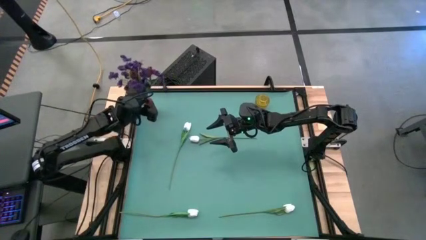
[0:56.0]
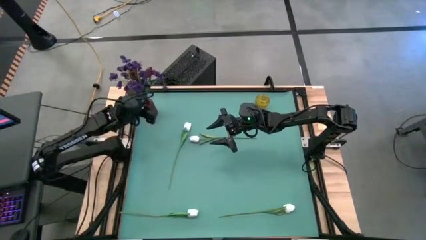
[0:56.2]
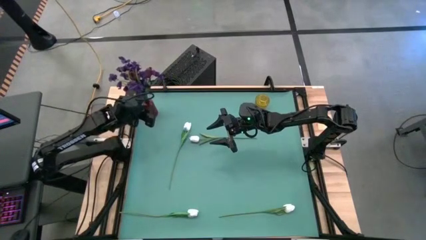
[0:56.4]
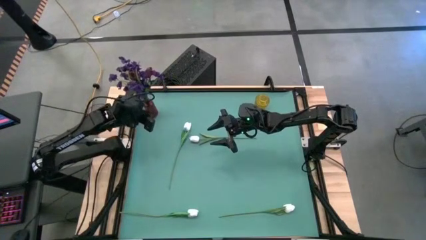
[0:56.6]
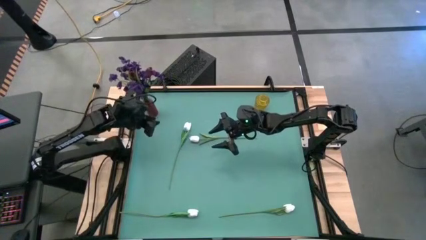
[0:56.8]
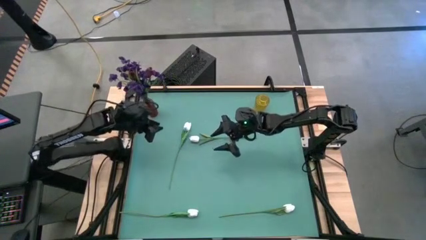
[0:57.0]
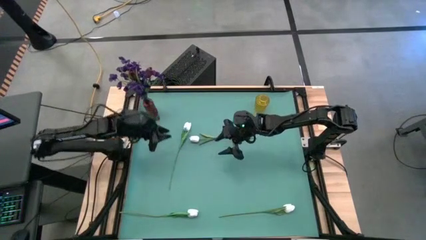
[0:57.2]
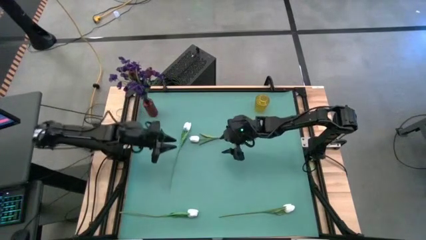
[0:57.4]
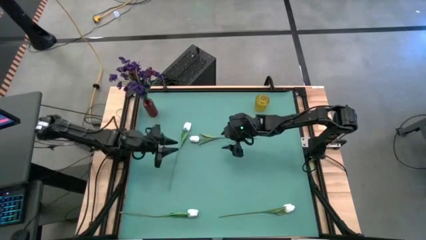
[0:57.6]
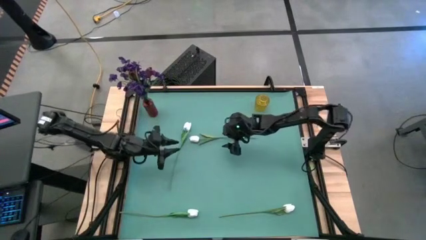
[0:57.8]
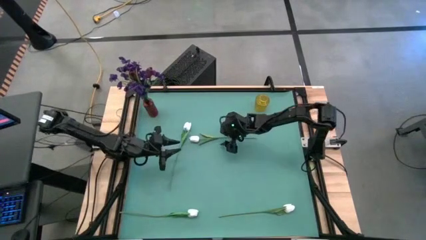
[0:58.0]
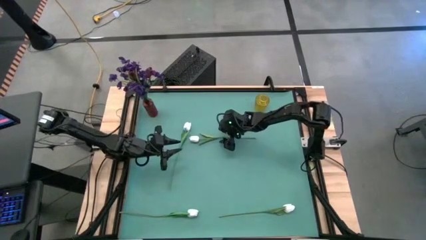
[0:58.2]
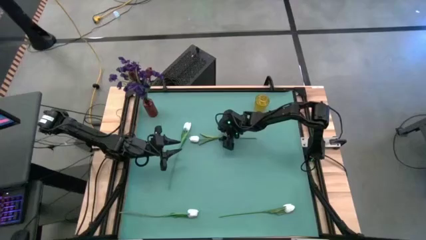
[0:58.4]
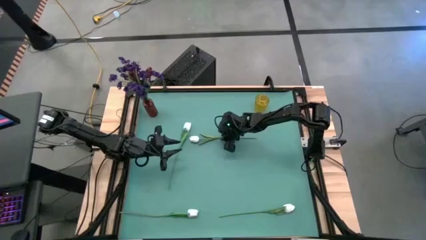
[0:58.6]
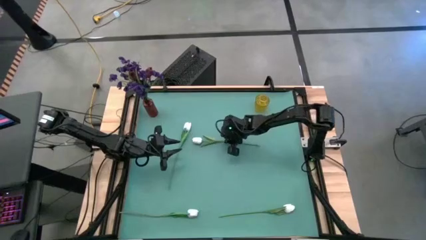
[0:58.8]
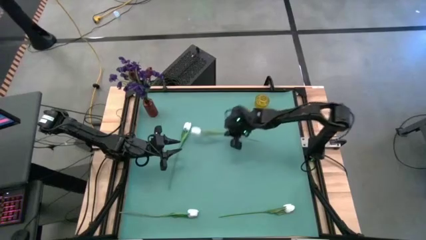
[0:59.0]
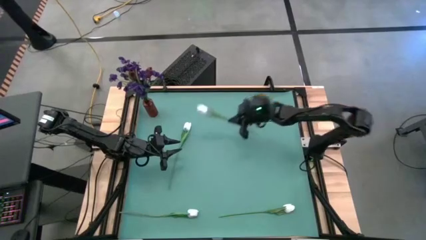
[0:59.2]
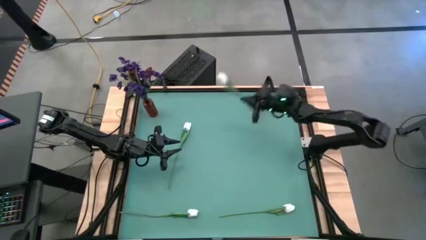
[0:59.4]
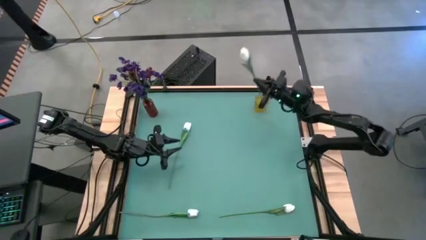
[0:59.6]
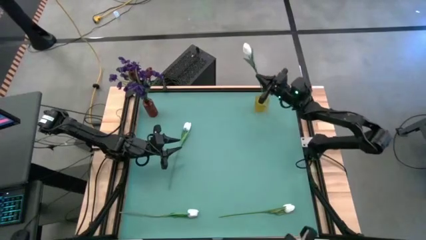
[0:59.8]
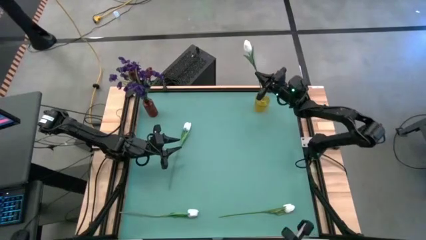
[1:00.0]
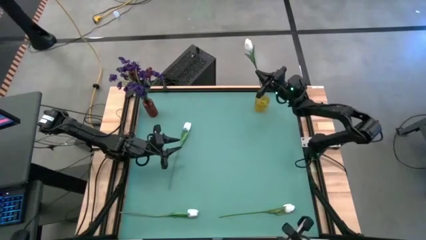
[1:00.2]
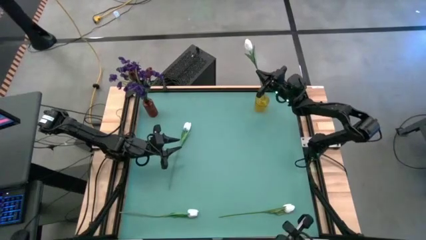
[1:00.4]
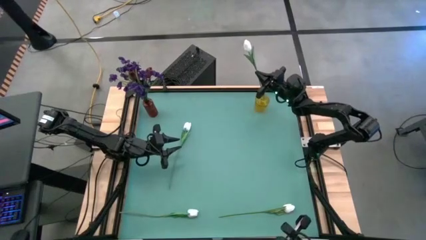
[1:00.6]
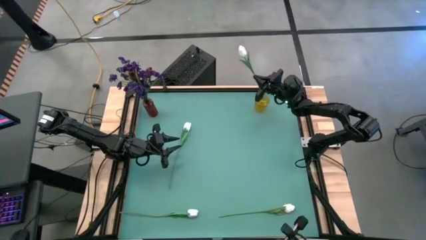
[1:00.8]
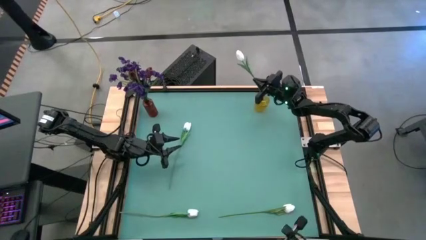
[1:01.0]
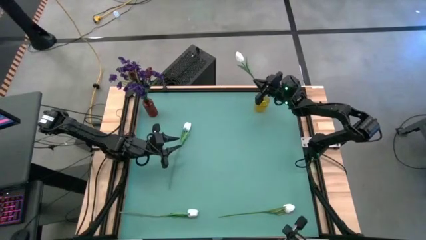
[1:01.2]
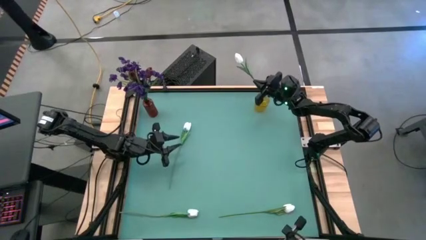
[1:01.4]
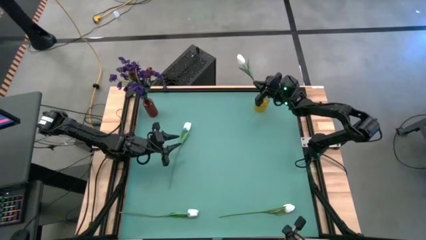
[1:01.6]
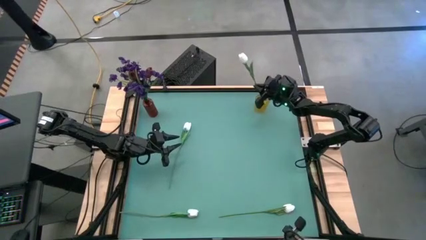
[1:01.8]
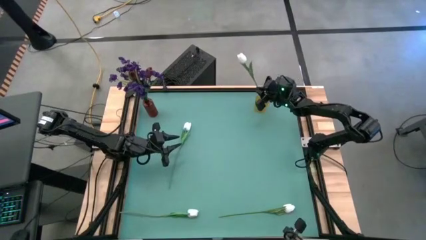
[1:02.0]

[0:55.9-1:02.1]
Task: Sort flowers into vase by color
Put the top right white tulip into the yellow vase

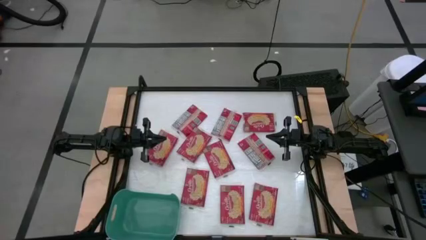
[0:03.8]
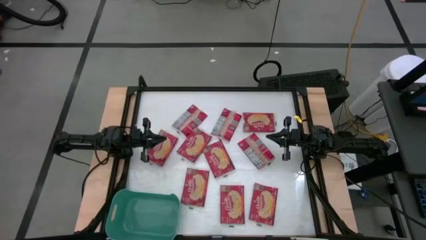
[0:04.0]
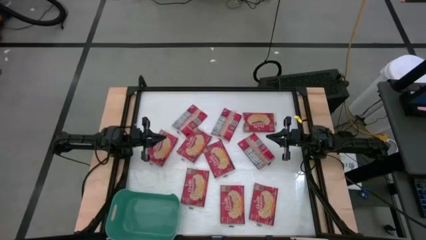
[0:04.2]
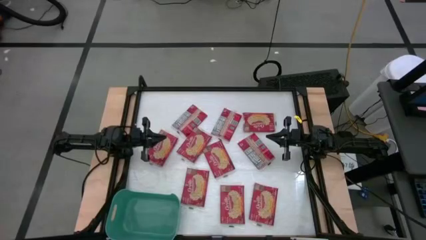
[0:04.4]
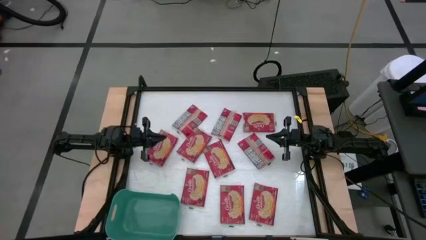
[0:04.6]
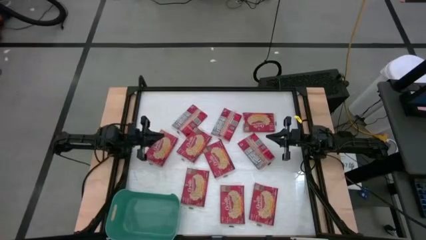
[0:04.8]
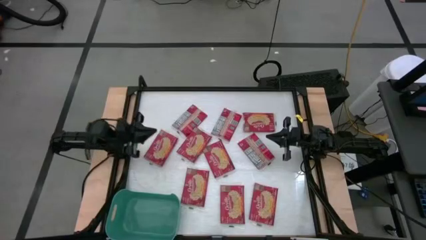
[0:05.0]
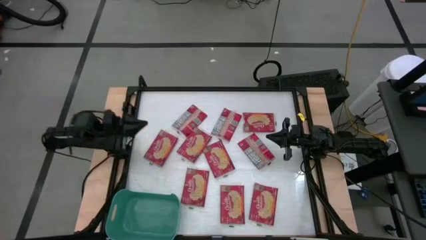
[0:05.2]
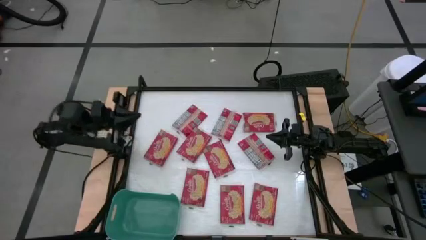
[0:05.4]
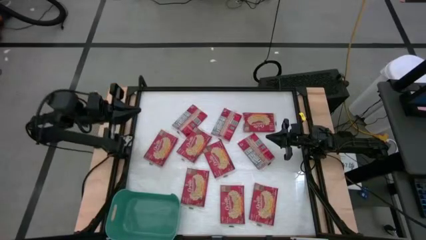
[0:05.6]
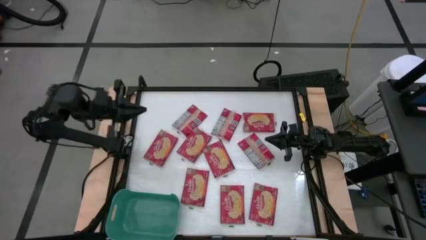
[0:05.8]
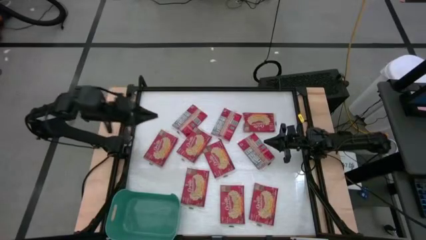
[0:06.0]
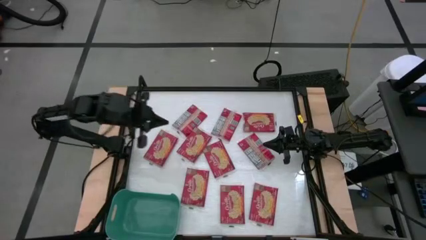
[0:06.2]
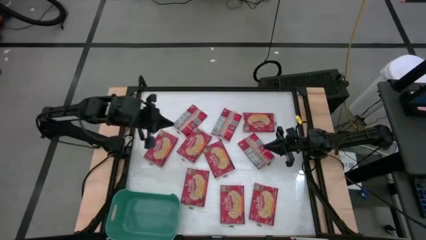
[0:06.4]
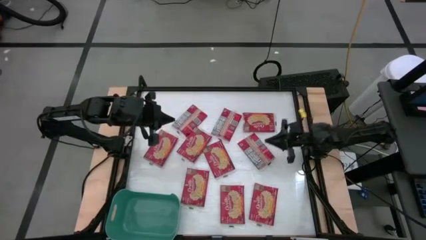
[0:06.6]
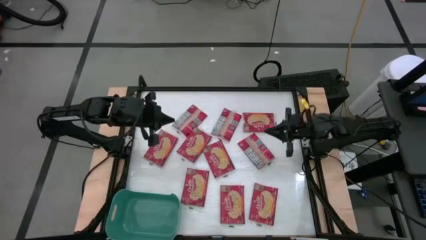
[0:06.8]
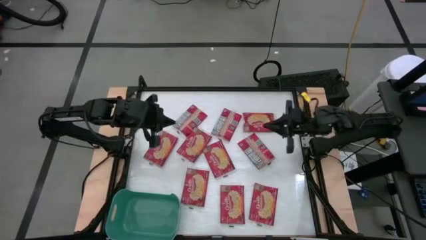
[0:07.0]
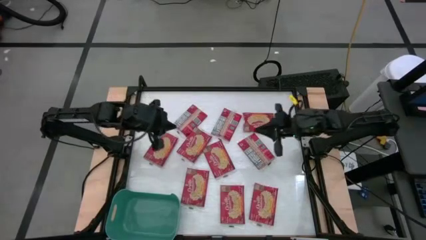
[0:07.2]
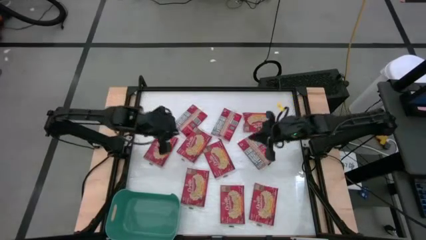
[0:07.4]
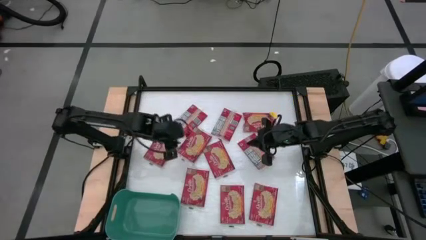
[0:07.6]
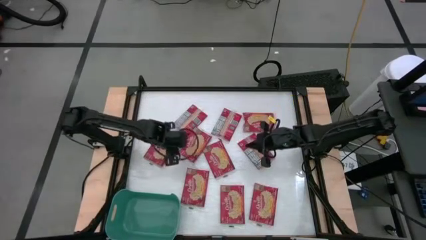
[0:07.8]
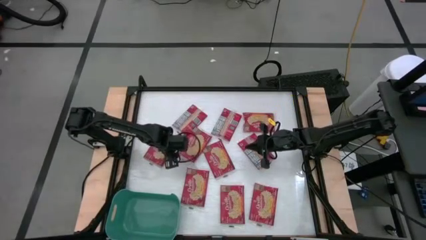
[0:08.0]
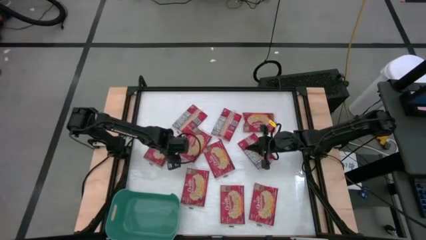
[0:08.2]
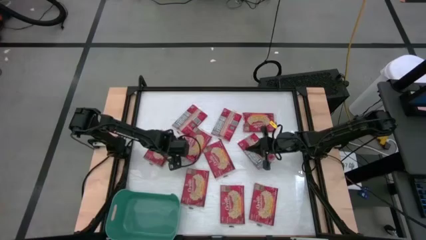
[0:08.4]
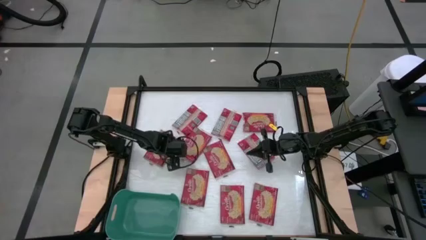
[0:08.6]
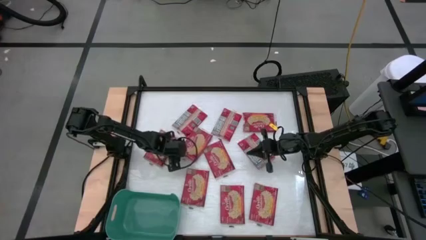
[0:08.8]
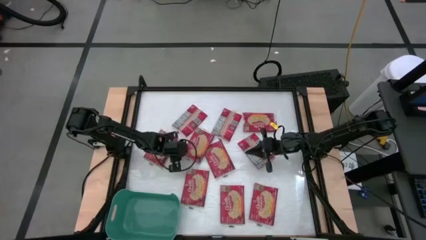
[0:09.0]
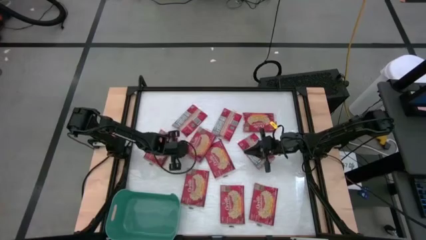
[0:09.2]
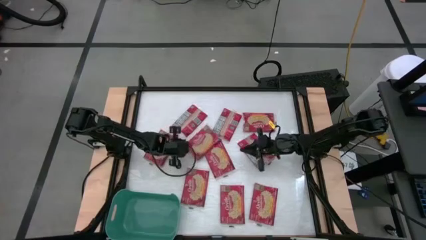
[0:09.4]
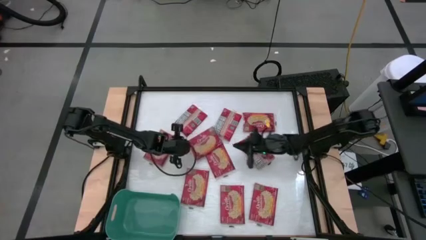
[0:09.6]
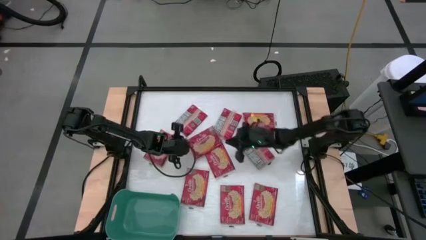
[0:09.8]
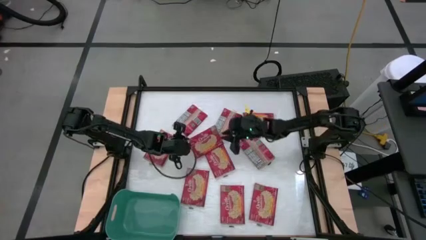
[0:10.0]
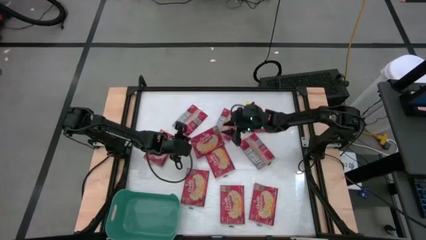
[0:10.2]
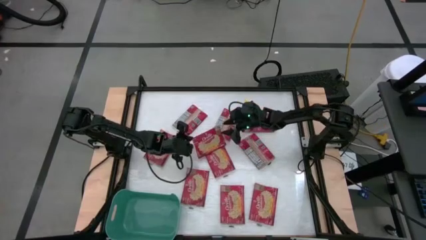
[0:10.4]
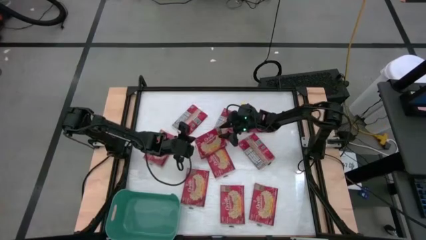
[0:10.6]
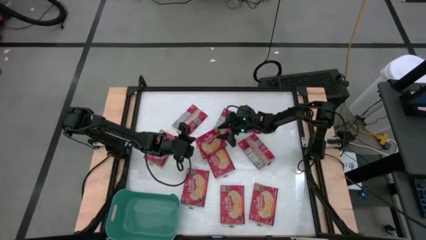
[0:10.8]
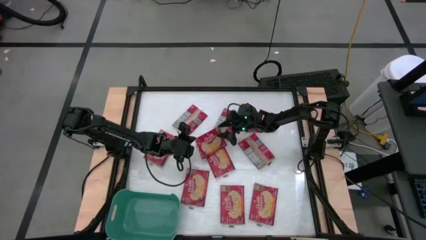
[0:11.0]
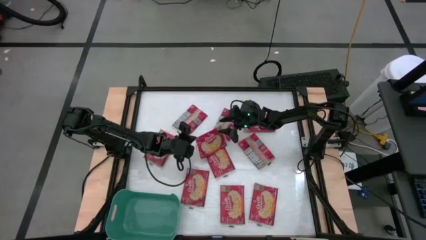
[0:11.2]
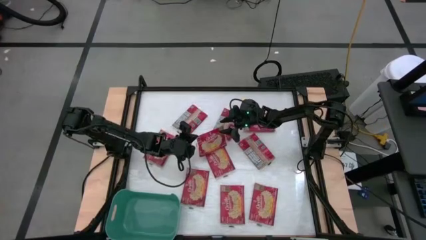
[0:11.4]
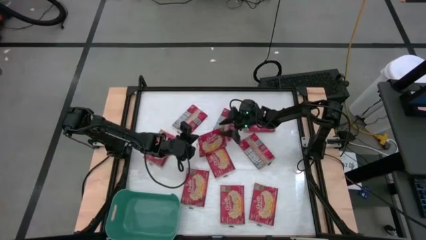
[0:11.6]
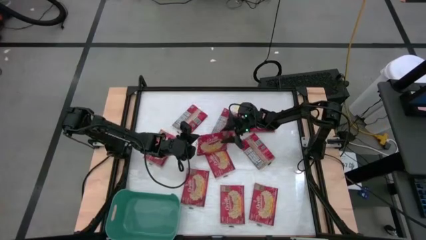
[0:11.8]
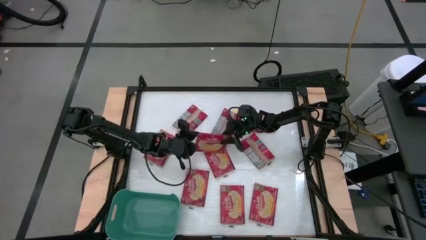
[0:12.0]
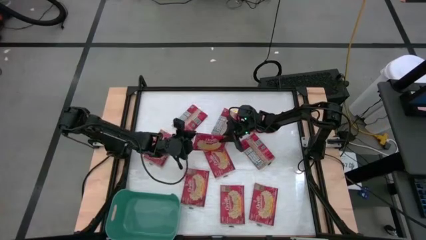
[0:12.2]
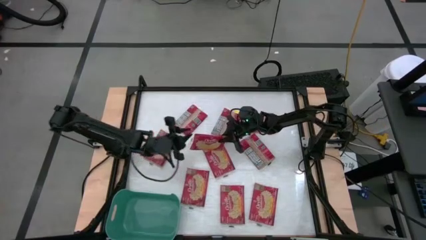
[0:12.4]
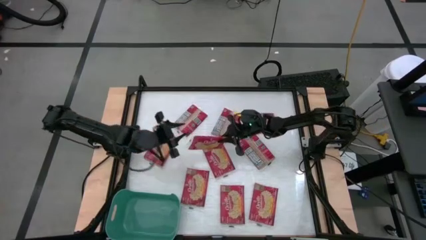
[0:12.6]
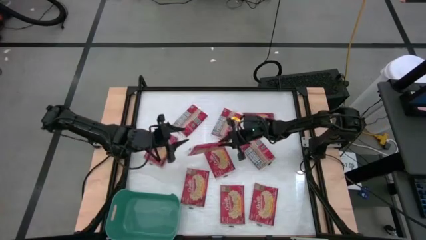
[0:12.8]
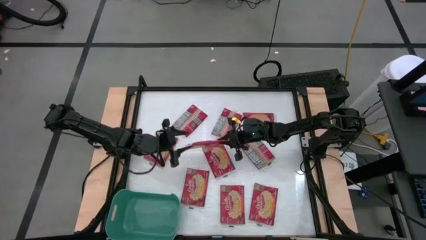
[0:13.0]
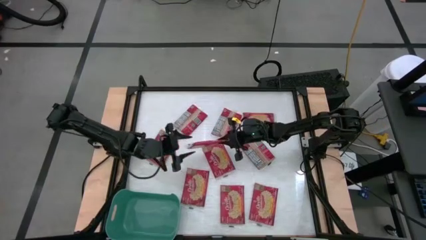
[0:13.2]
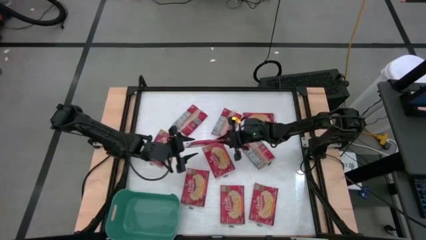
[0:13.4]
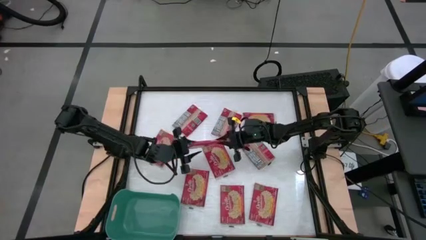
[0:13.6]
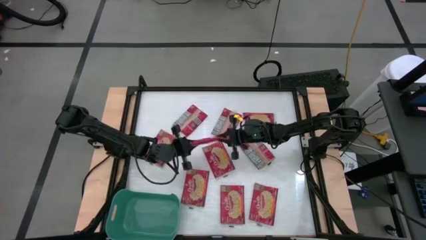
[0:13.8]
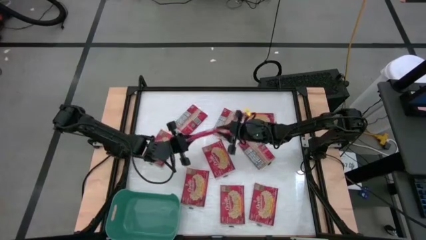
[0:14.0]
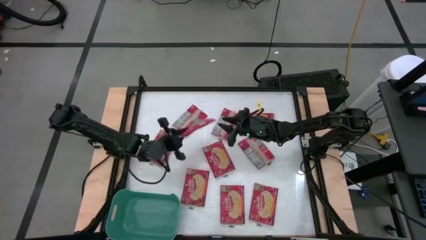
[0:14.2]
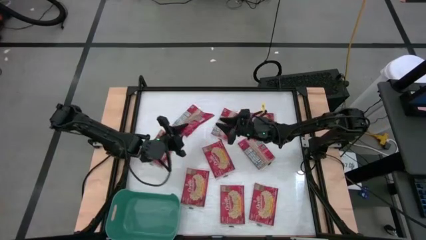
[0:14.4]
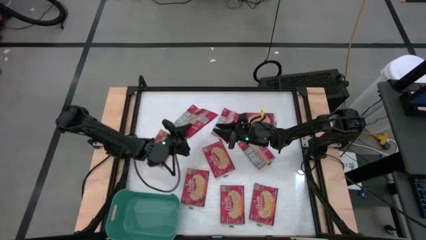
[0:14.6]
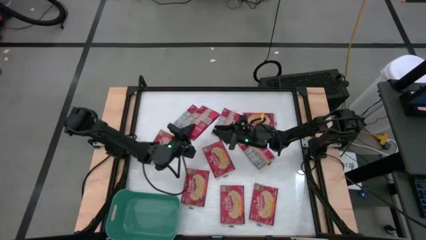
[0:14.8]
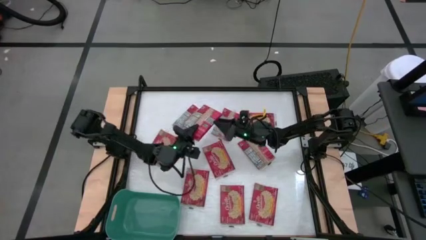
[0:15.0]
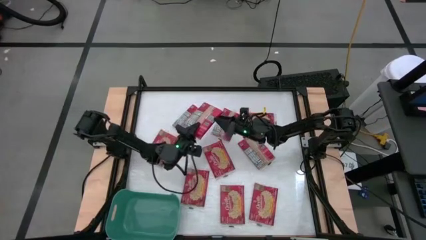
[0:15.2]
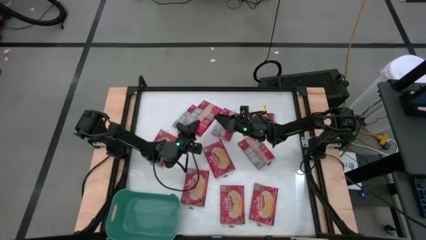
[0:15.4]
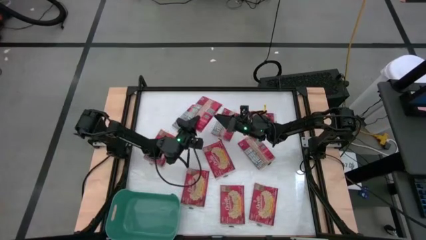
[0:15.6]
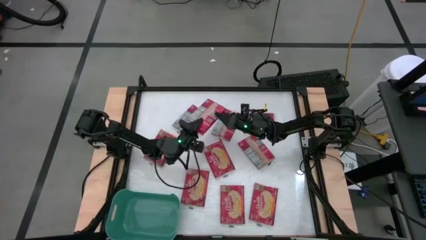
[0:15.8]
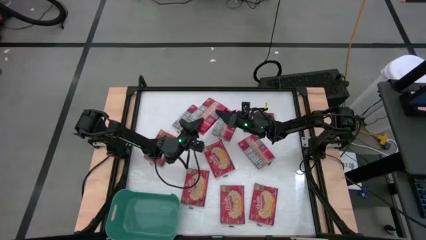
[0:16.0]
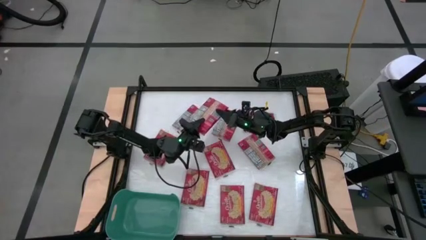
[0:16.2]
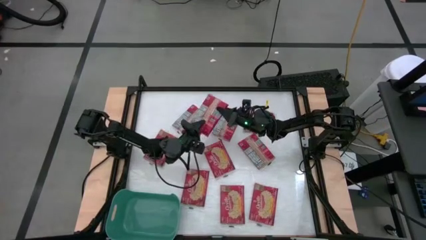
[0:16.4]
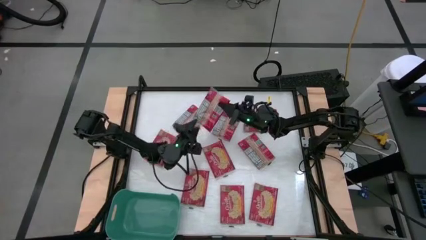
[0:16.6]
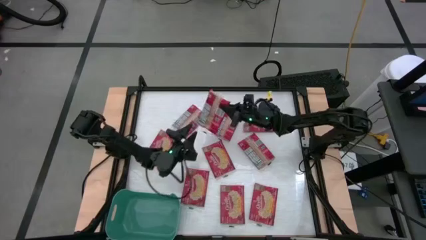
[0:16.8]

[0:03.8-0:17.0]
Task: Sort popcorn bags into baskets
Put the red popcorn bag into the green bin
